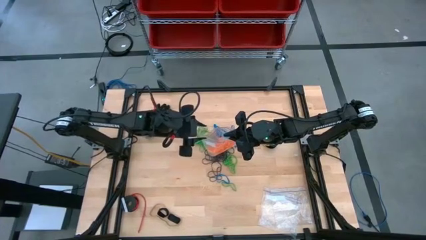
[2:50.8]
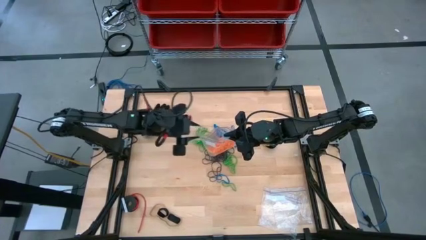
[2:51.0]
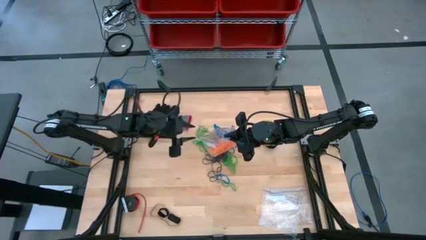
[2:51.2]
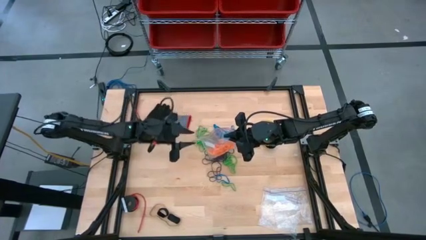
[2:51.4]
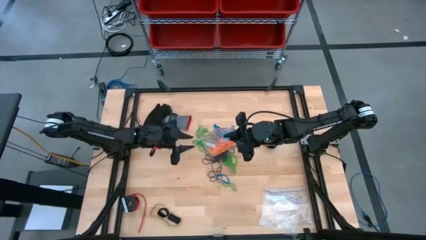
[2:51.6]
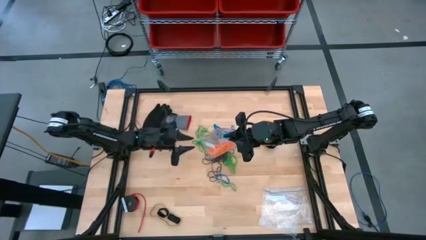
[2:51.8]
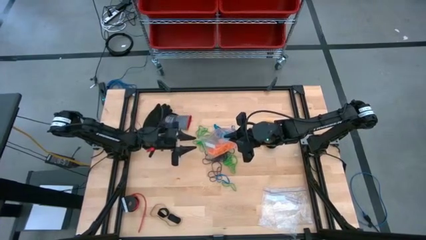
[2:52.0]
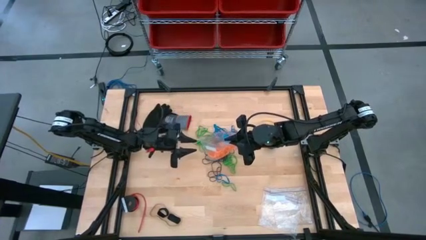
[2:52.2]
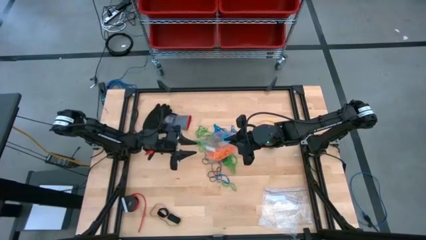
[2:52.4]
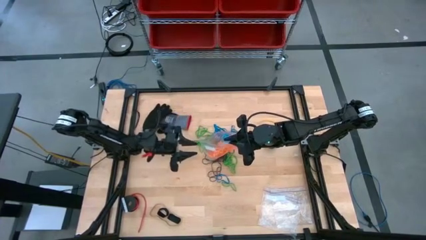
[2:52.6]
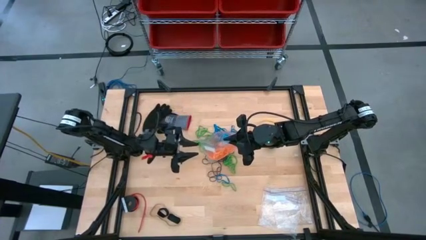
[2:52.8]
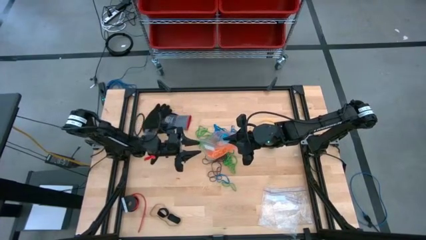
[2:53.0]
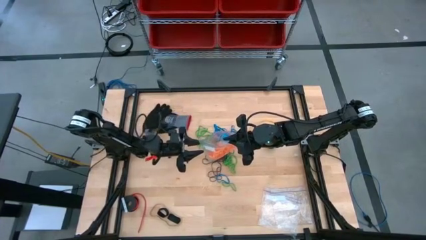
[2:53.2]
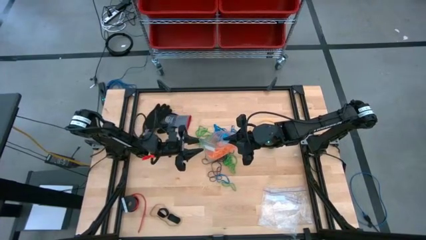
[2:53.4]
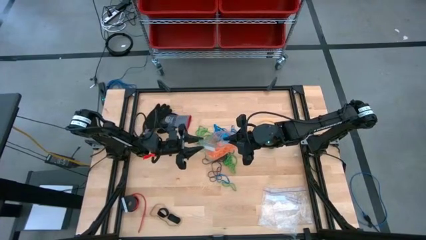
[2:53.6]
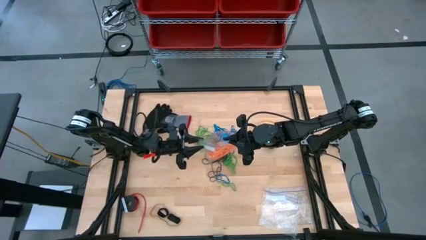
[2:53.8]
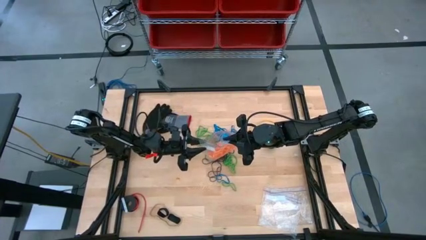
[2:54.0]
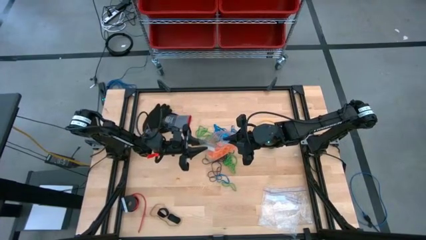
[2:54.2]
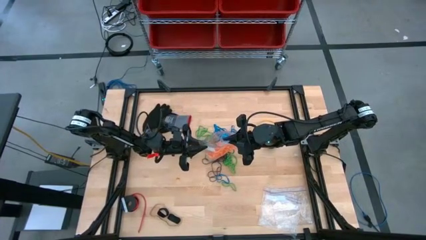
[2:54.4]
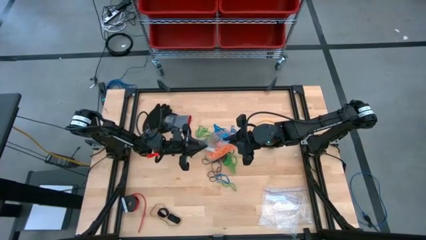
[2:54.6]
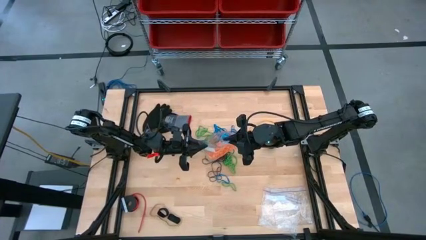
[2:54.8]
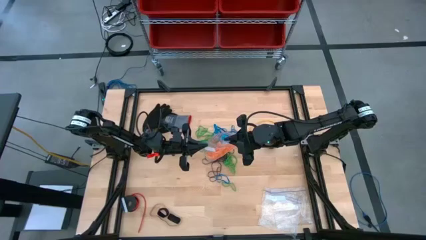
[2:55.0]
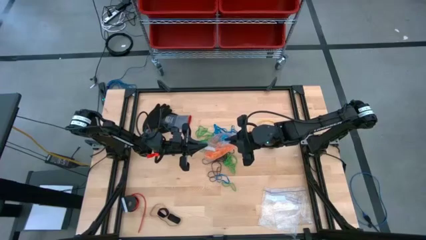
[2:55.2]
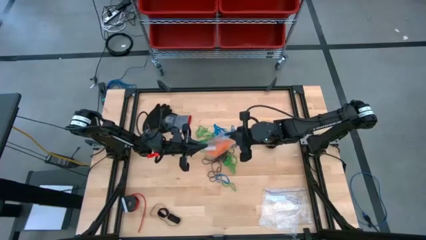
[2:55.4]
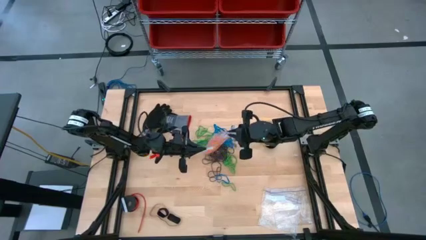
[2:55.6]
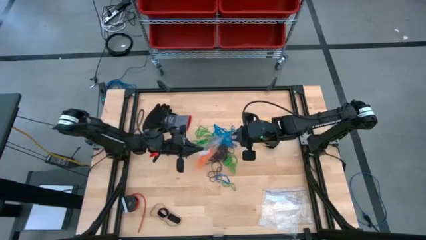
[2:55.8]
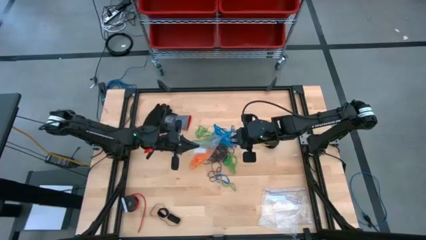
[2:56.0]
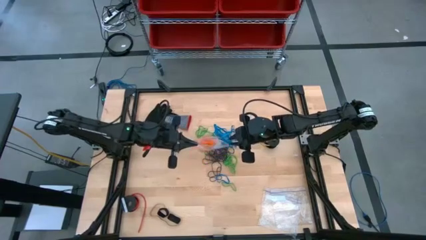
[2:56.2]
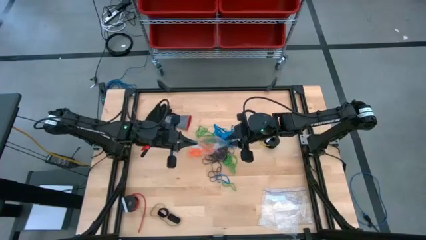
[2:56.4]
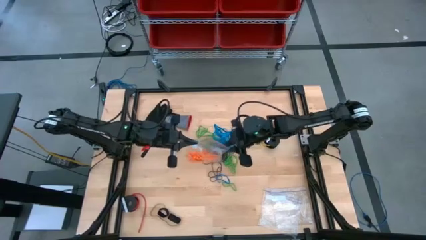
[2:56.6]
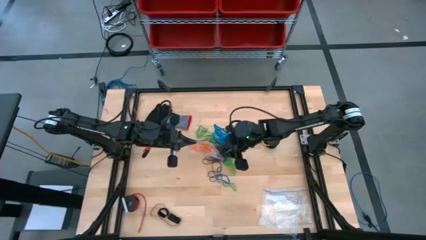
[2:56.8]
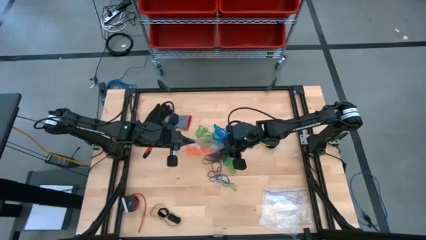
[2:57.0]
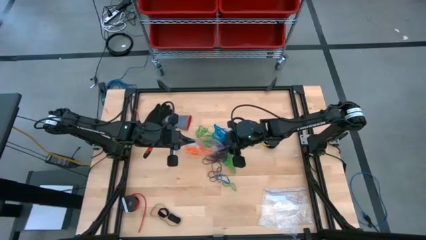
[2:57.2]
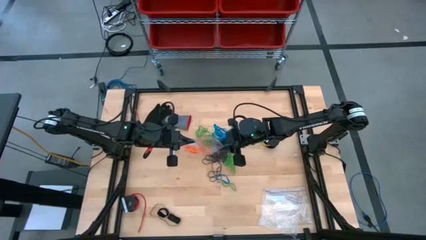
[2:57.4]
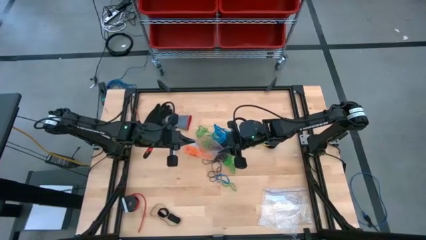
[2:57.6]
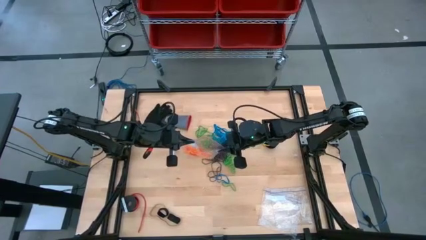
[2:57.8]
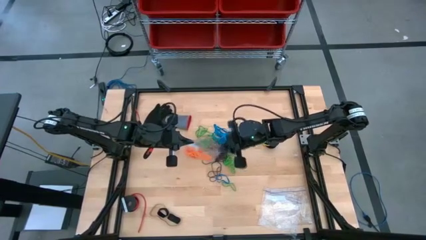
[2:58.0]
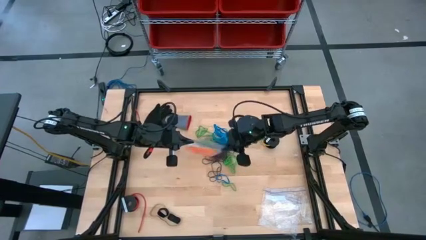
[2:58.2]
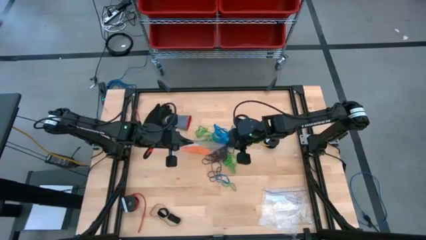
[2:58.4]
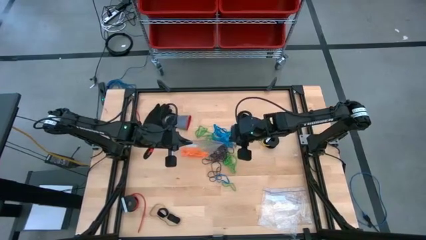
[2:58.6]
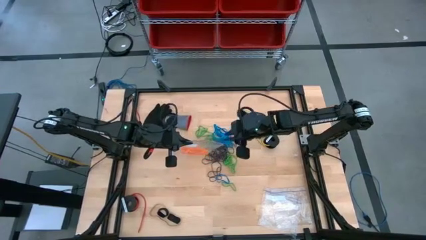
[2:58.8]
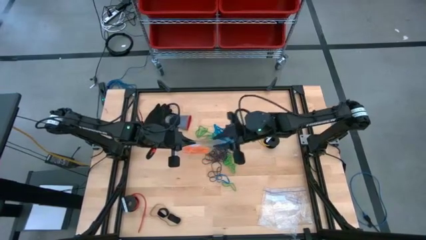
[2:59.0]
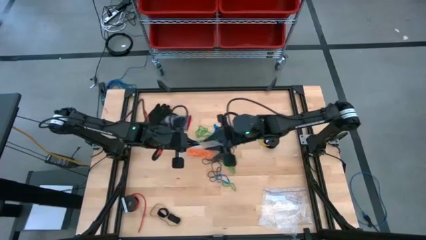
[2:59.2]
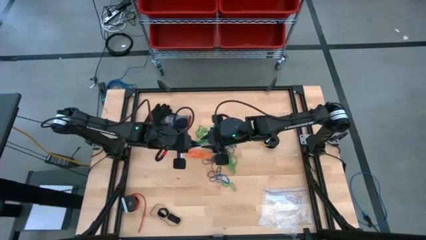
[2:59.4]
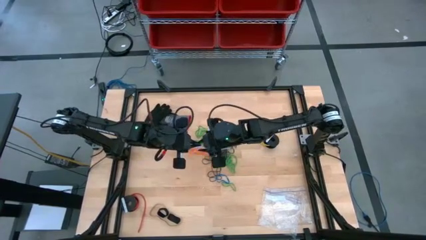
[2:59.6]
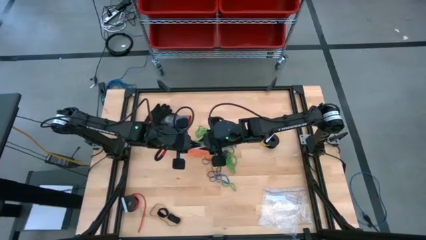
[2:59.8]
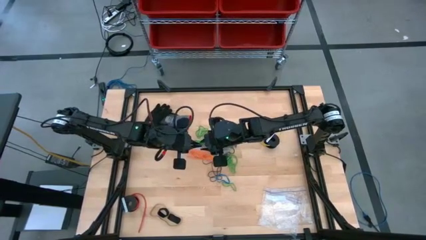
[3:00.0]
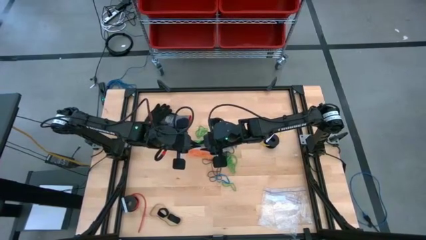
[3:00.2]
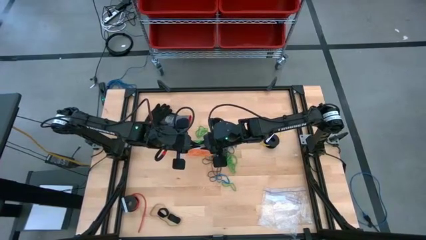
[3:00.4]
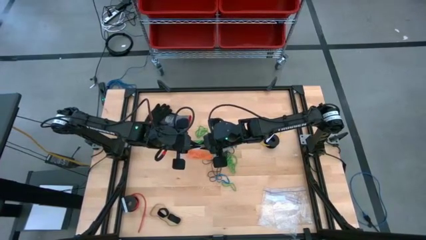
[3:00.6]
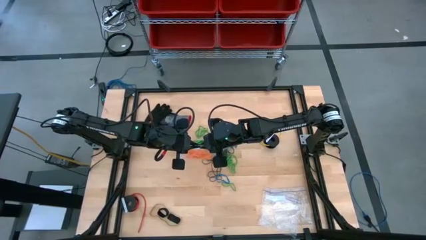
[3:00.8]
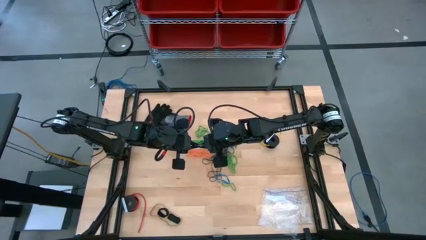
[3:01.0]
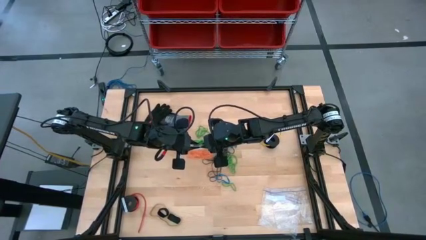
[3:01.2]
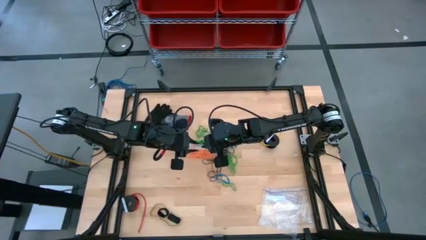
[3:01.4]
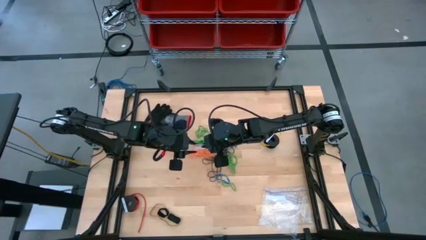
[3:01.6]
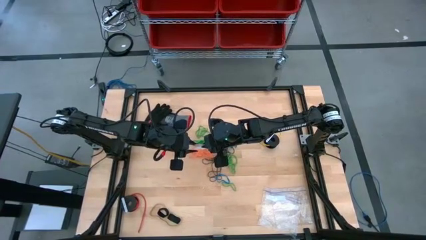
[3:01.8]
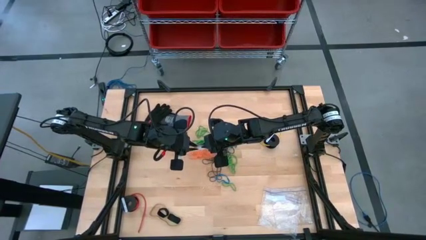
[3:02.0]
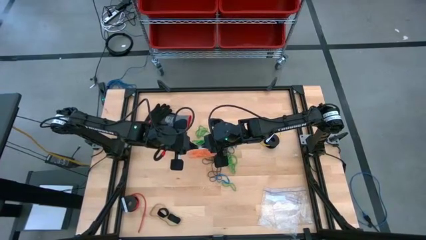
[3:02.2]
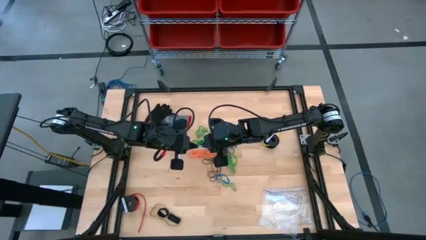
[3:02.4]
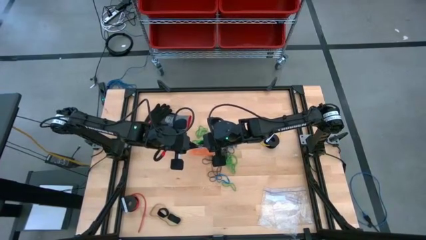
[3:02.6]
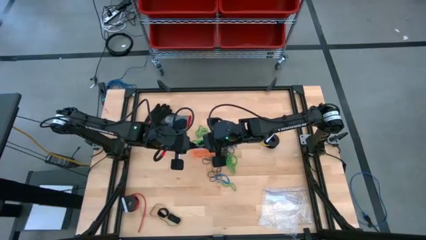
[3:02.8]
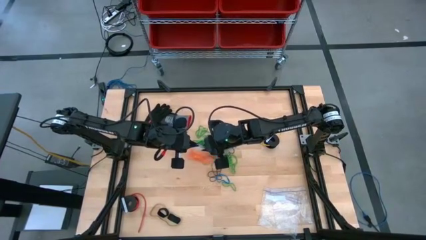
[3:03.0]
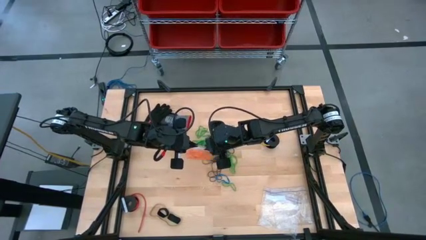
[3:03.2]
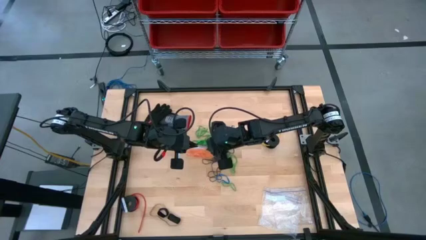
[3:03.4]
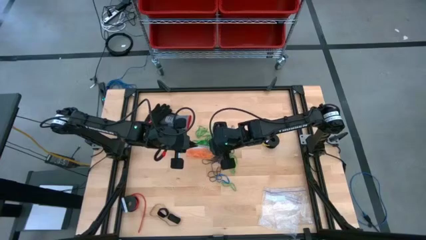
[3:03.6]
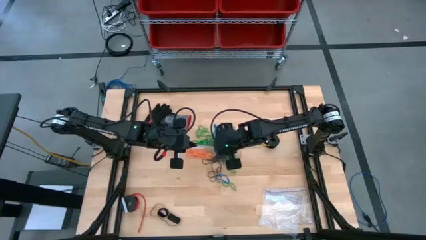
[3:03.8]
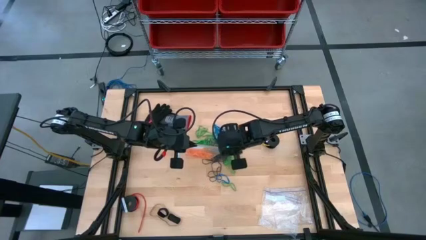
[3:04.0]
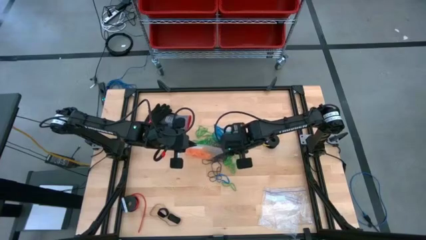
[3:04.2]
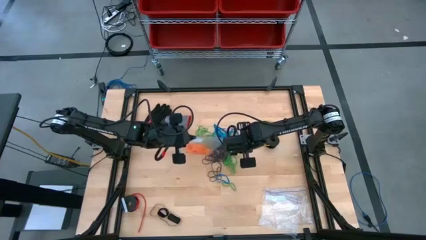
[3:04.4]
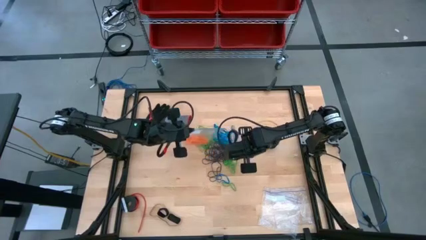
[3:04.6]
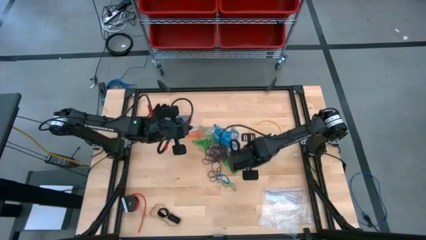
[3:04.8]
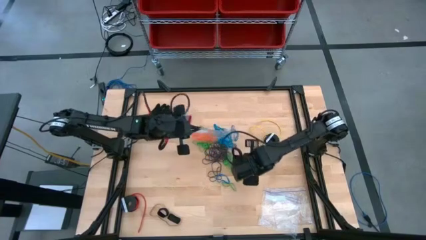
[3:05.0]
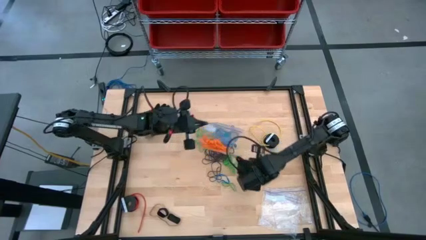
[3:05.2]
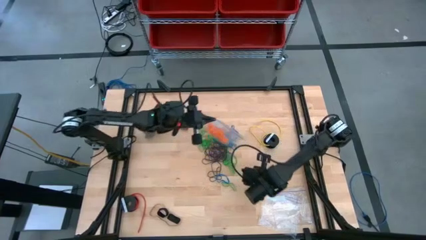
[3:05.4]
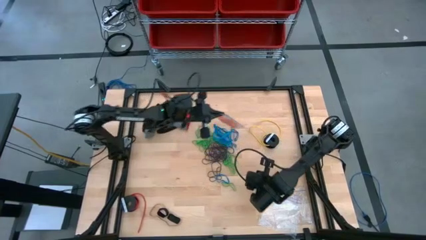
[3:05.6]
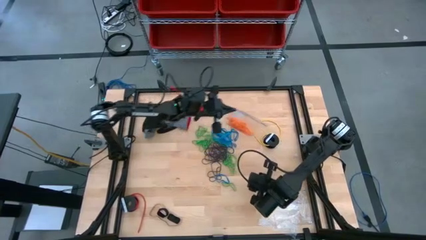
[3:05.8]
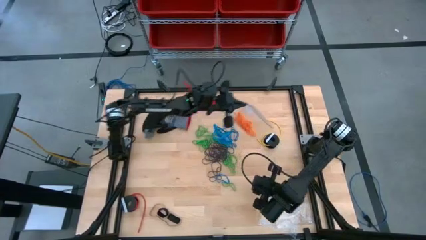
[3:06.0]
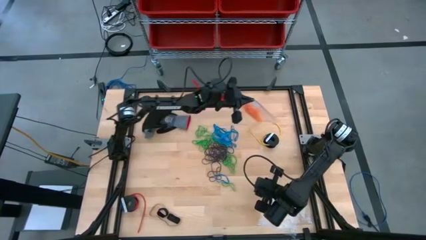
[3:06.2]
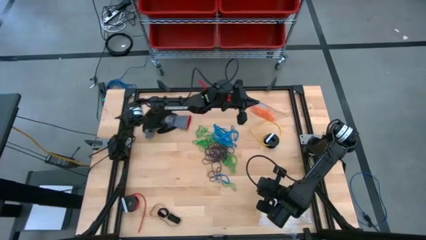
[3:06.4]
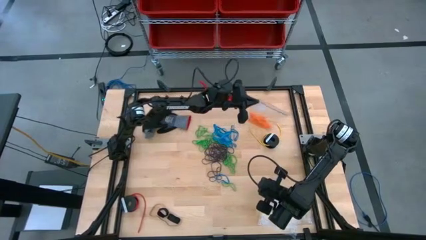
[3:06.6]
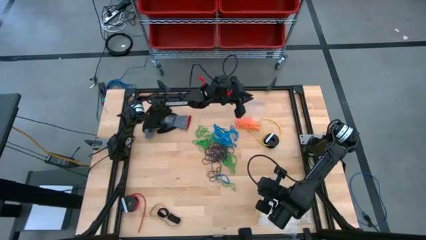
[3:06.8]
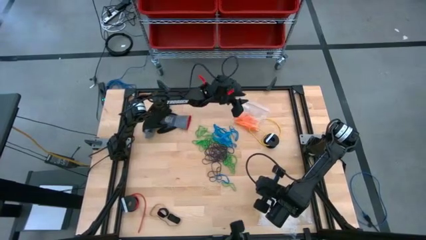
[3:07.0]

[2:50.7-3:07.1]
Task: Sort rubber bands
Close the transparent zip bag
